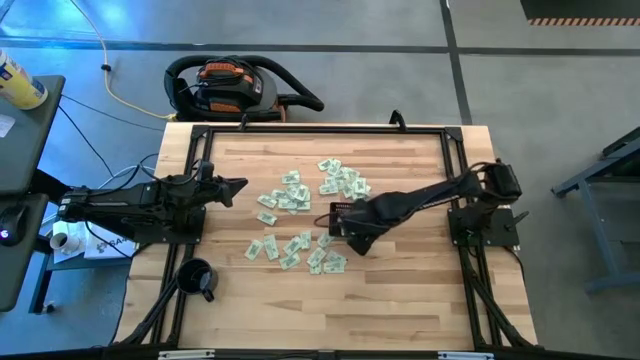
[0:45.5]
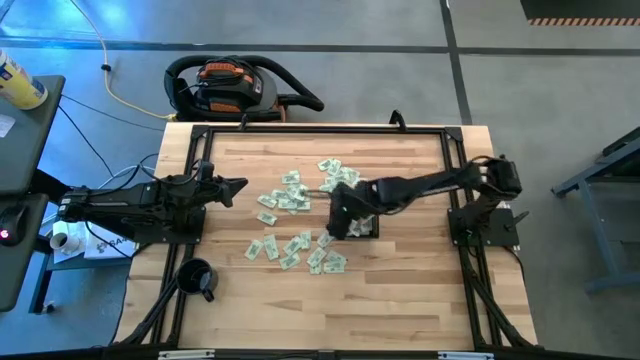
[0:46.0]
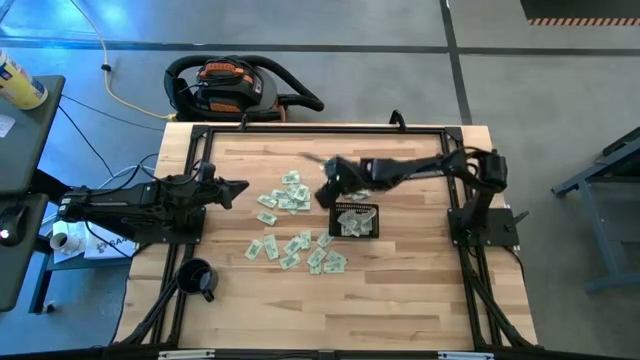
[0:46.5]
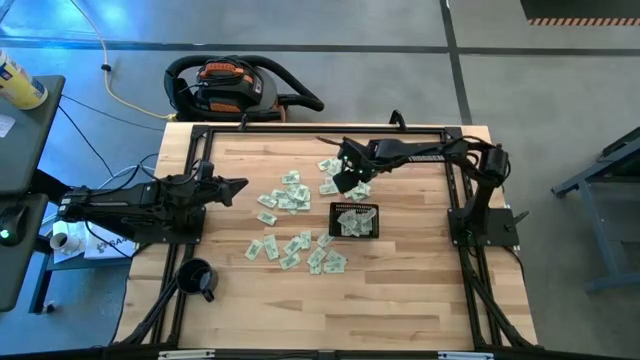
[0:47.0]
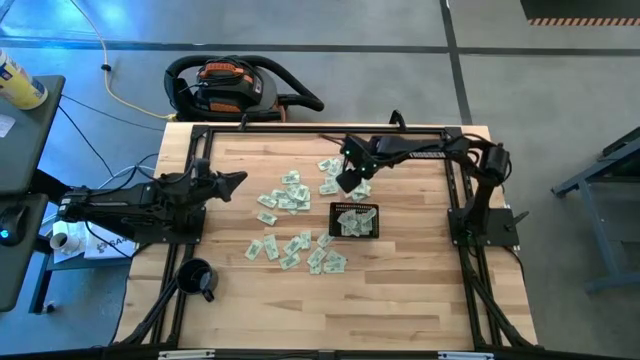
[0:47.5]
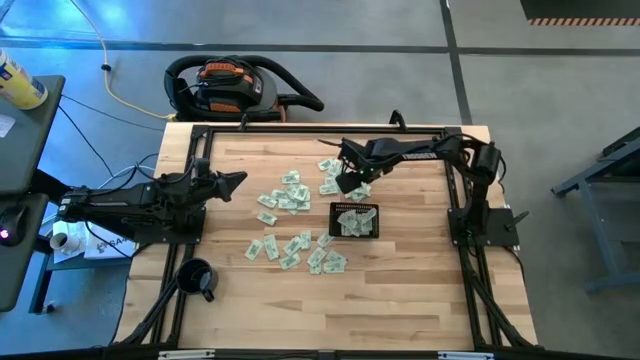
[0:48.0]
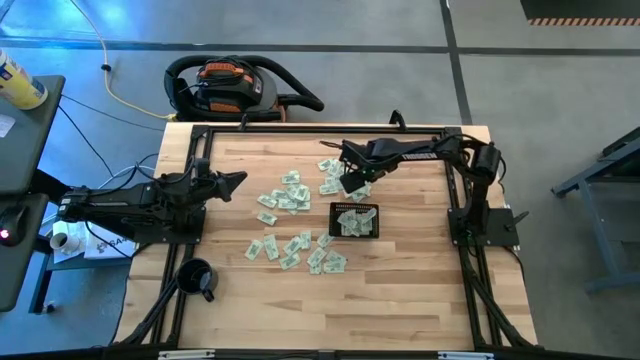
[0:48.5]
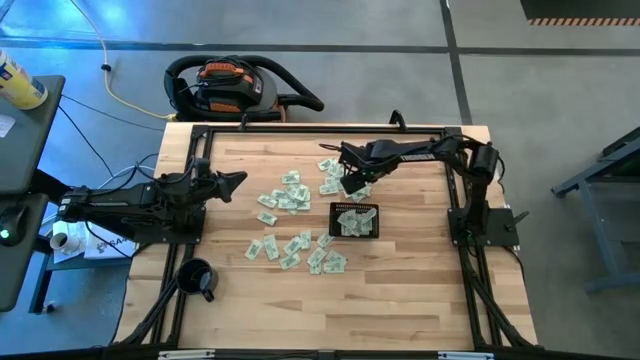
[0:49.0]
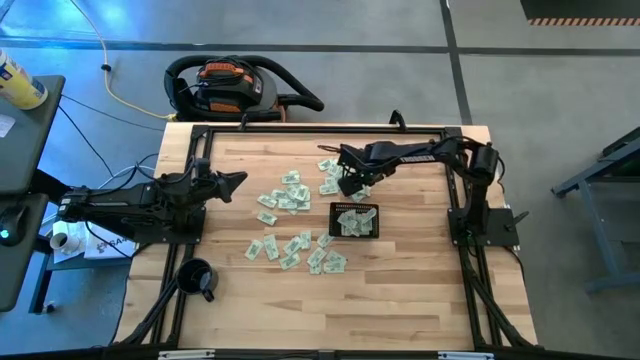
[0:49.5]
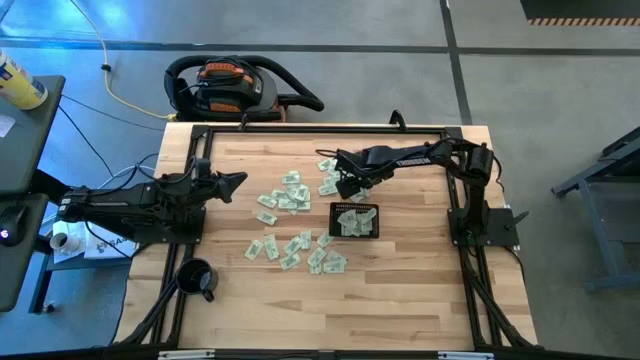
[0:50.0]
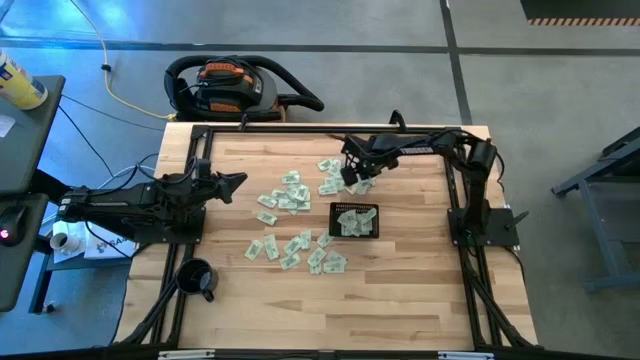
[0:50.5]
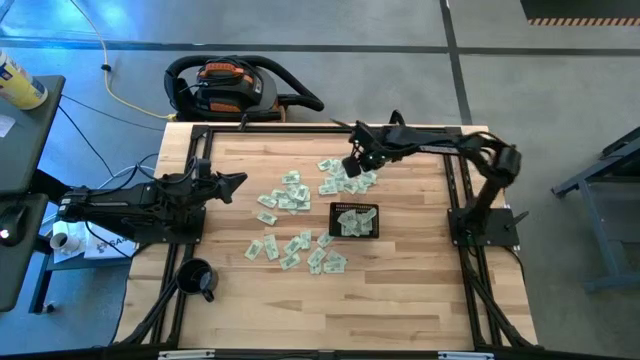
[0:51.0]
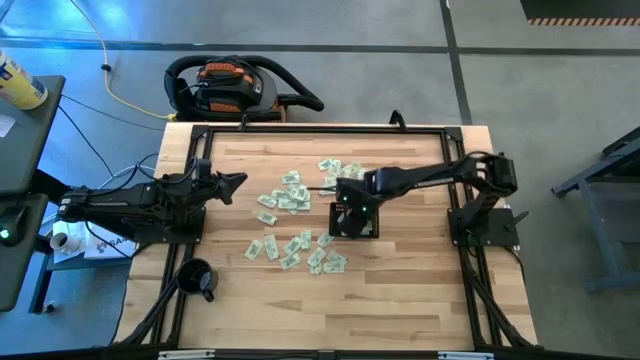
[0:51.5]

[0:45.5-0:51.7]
Task: Pick and place Stevia / Truvia into bins
Put the green stevia packet into the black bin

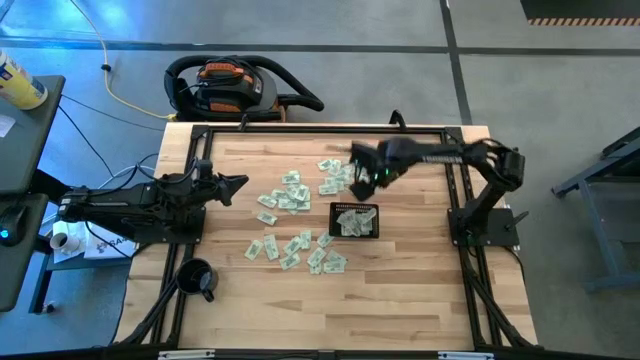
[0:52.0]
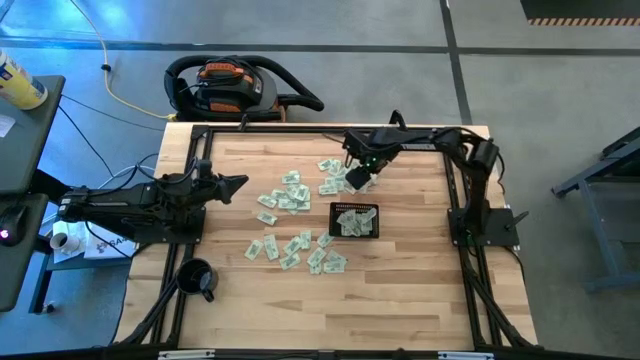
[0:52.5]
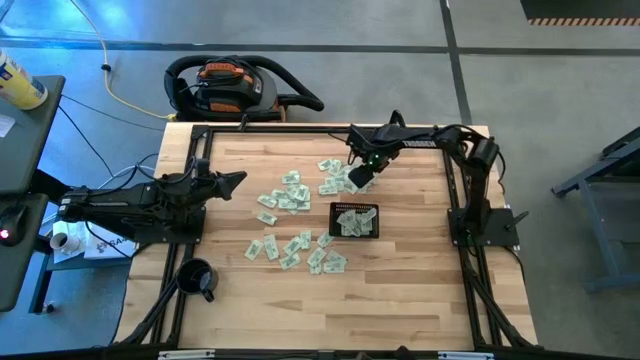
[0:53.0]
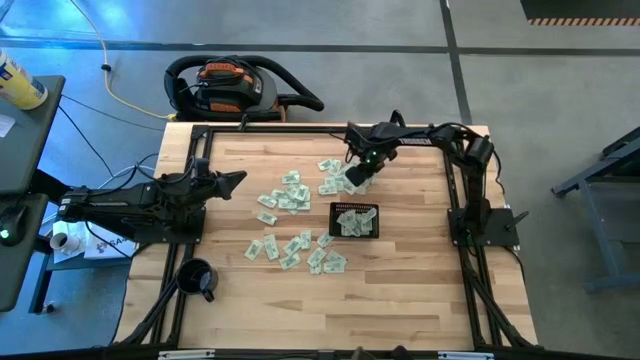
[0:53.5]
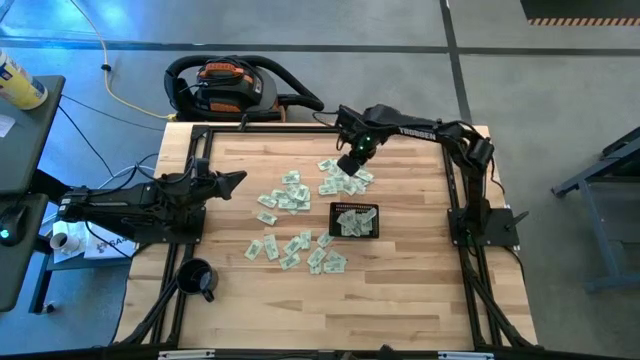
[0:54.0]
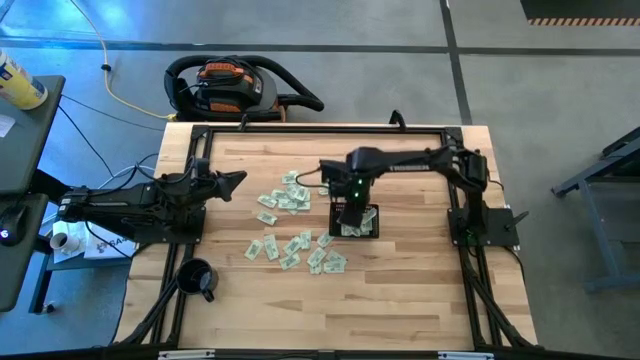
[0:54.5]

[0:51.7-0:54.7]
Put the green stevia packet into the black bin

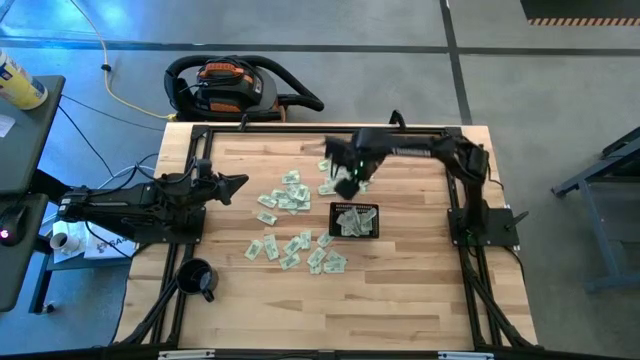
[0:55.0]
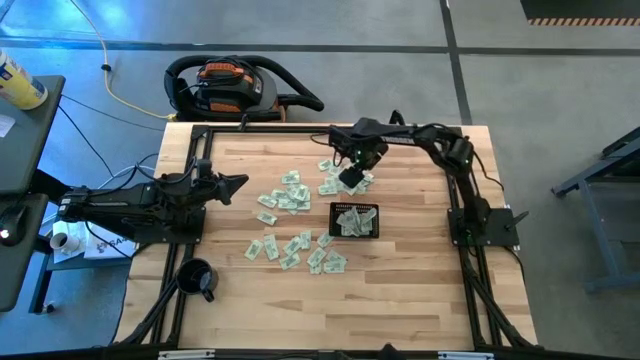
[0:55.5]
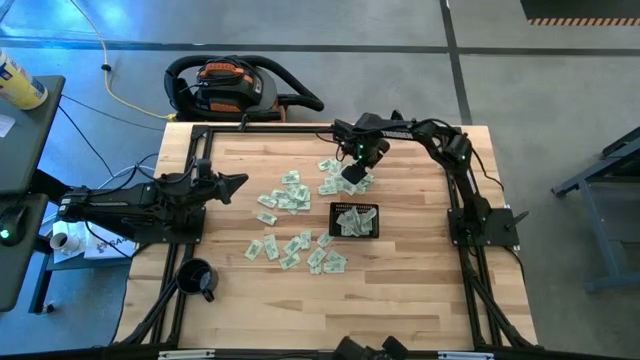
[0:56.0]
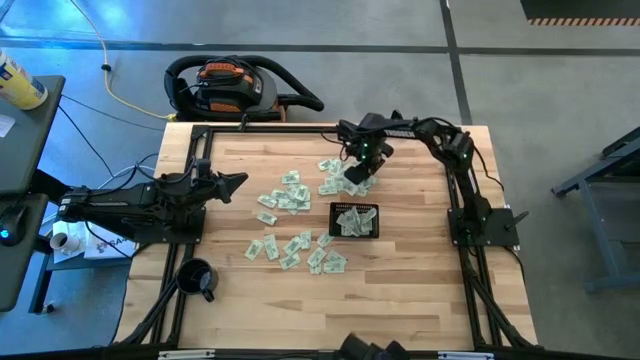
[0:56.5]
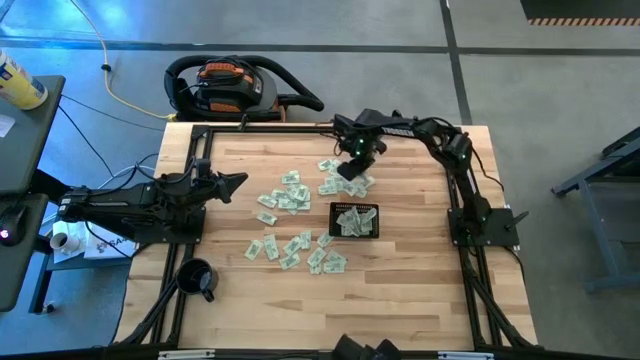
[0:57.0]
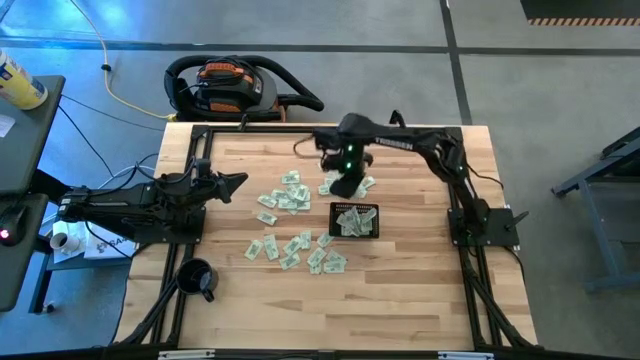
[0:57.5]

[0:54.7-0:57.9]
Put the green stevia packet into the black bin

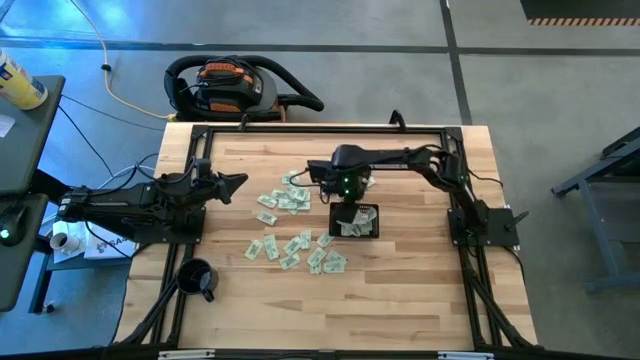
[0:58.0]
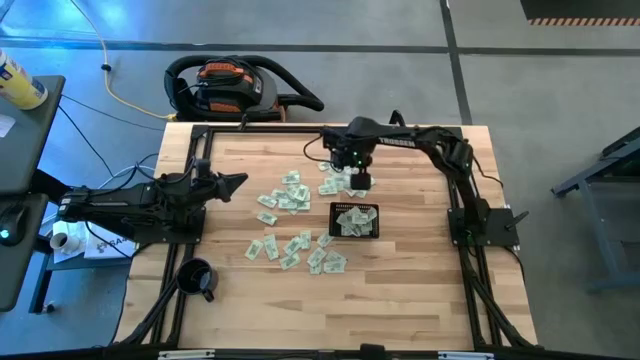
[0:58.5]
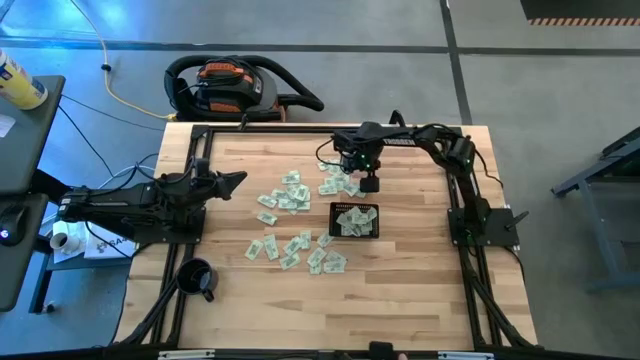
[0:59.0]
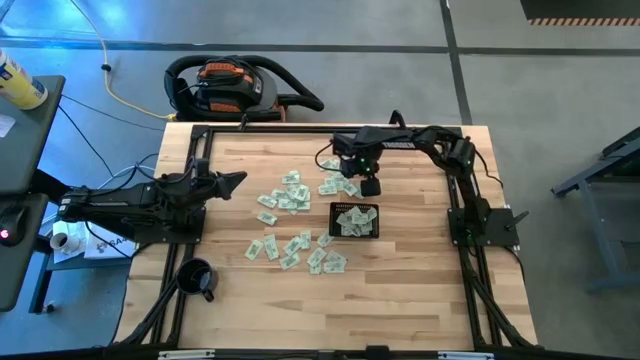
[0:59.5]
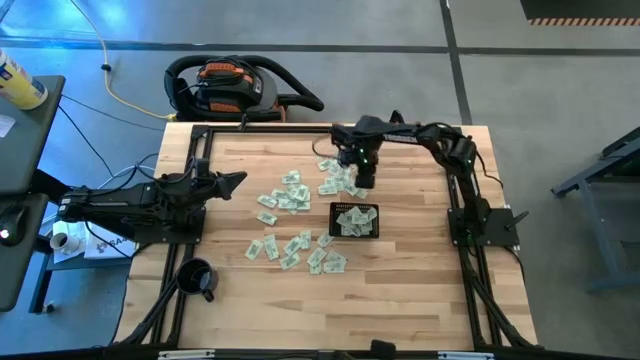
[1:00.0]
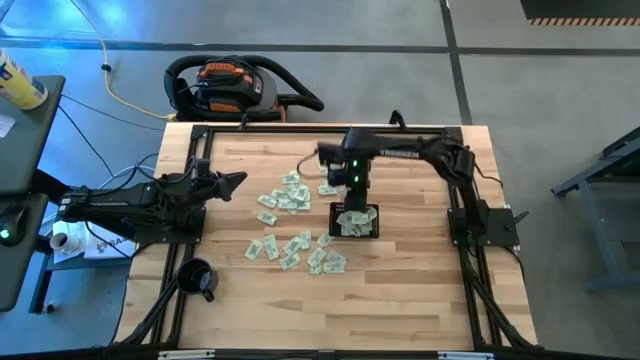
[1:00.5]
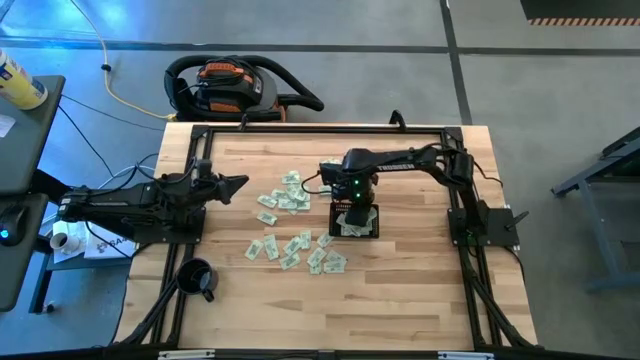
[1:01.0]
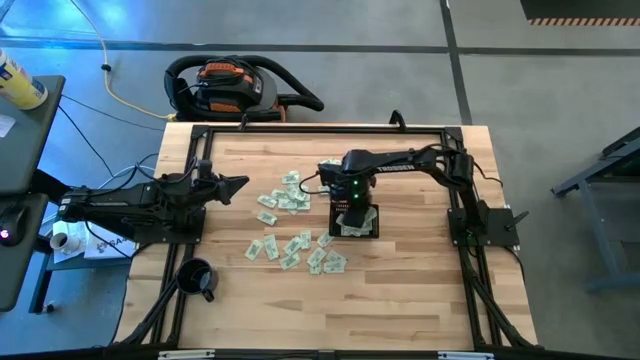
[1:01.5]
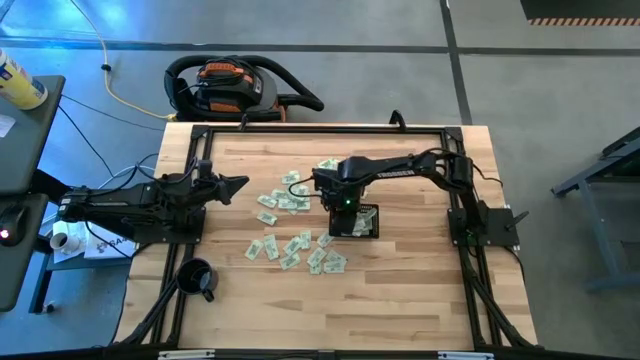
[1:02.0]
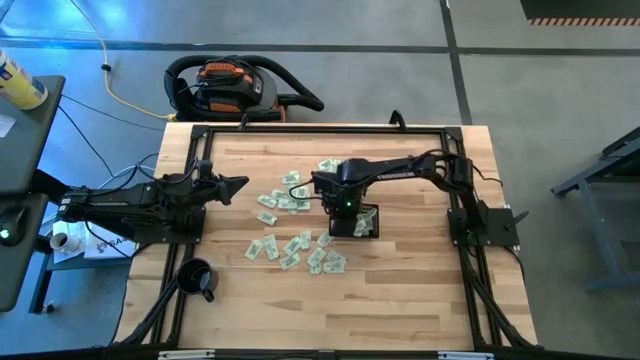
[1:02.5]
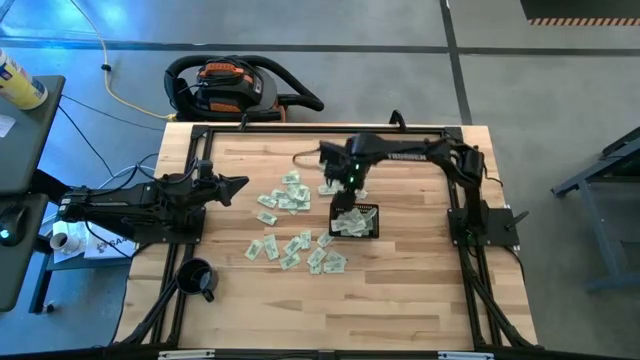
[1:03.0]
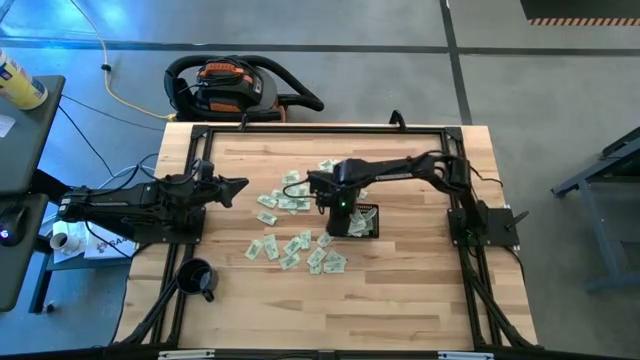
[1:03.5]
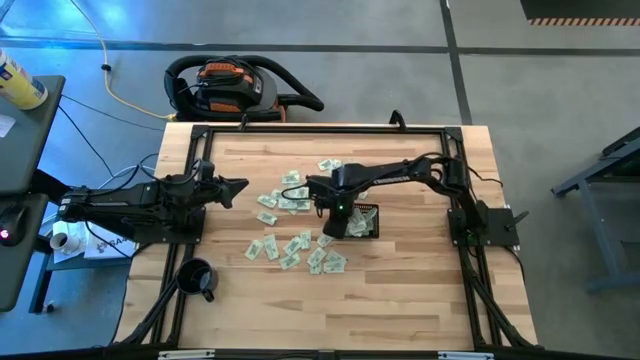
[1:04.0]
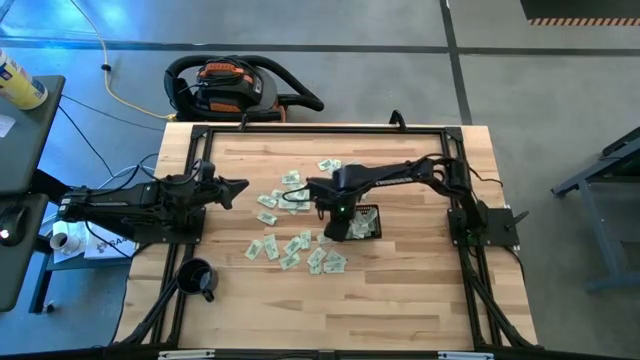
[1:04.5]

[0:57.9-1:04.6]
Put the green stevia packet into the black bin

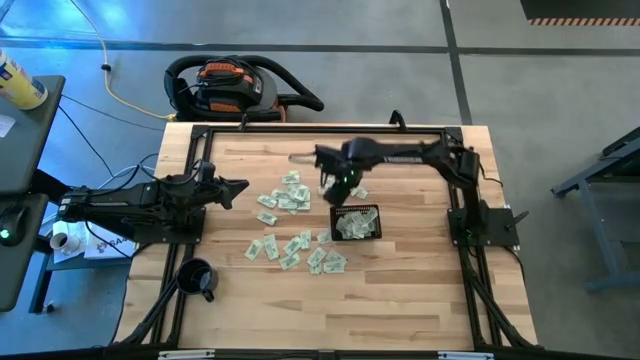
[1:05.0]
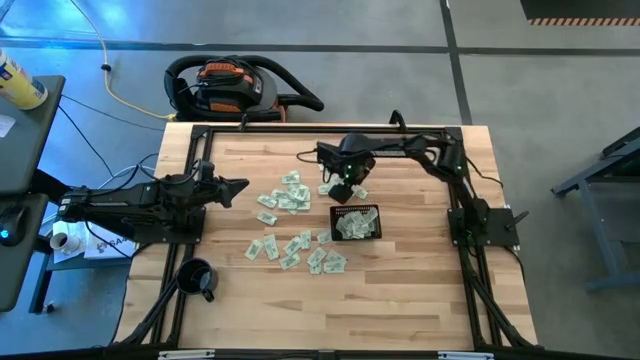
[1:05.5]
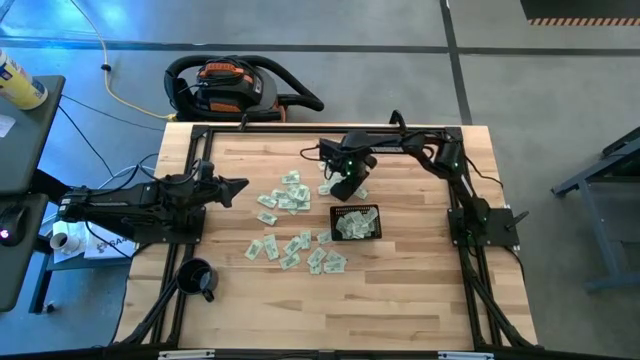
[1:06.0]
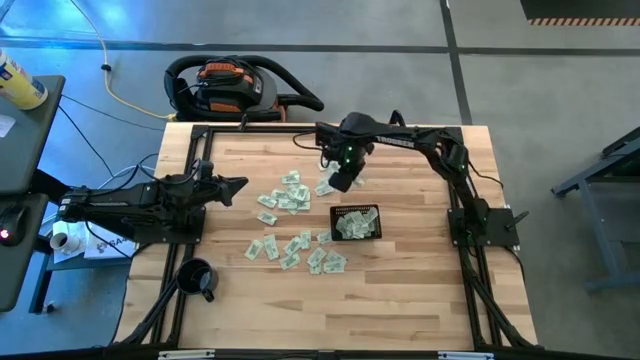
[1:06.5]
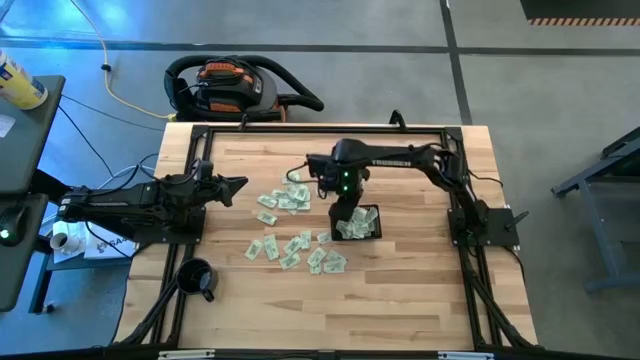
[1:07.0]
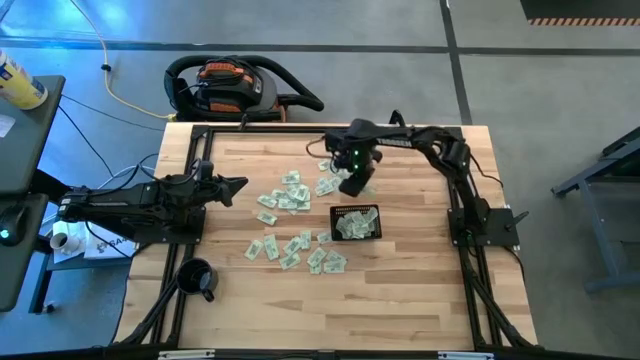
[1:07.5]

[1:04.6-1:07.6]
Put the green stevia packet into the black bin
